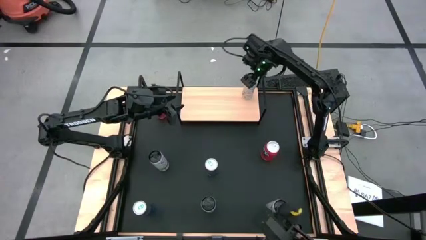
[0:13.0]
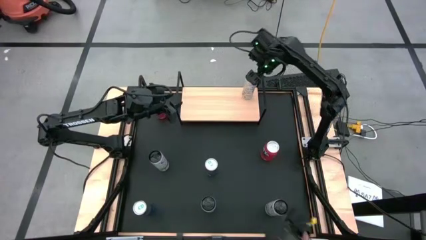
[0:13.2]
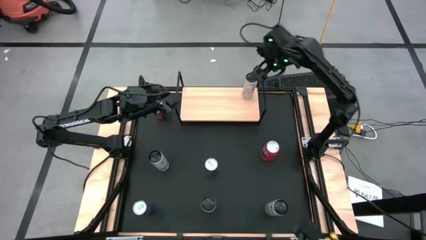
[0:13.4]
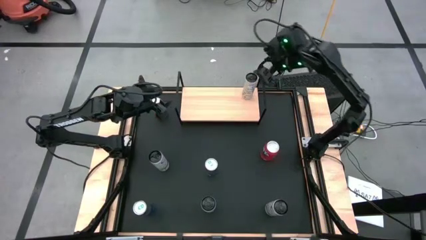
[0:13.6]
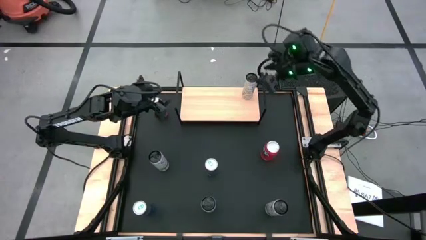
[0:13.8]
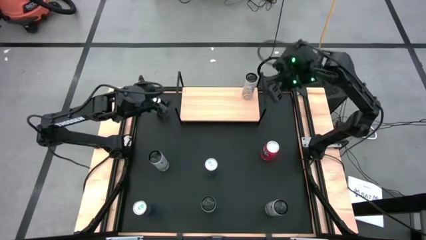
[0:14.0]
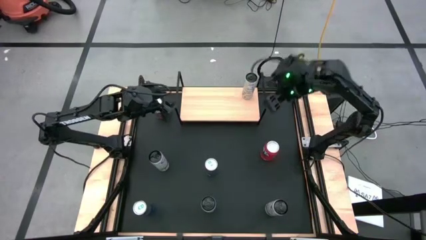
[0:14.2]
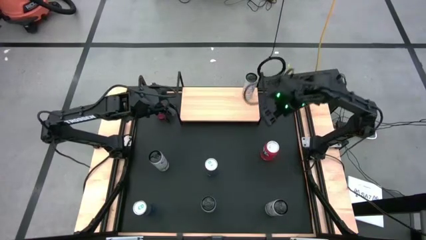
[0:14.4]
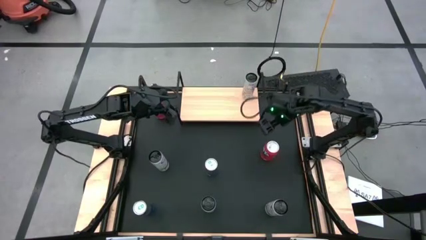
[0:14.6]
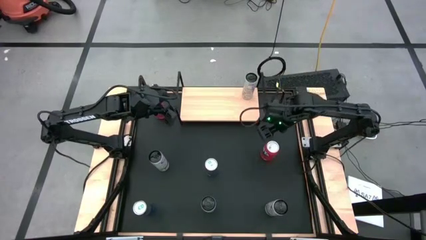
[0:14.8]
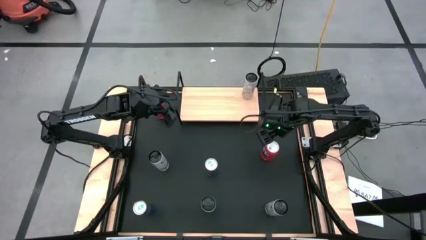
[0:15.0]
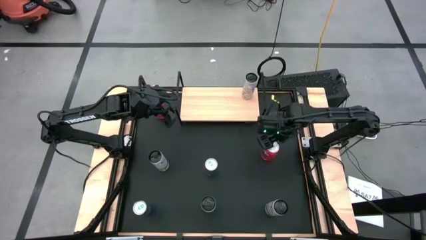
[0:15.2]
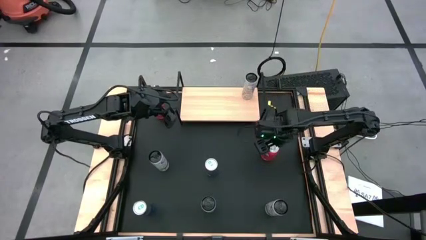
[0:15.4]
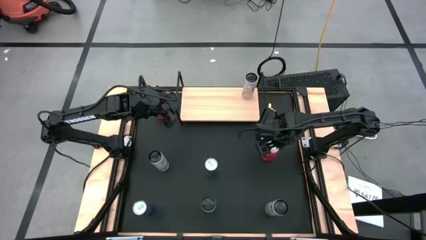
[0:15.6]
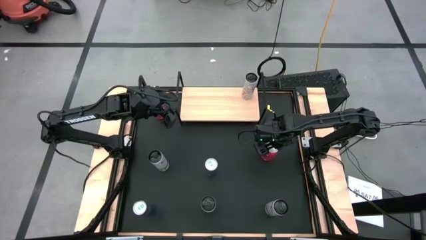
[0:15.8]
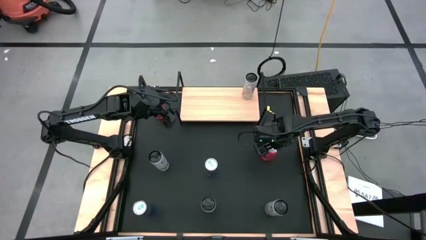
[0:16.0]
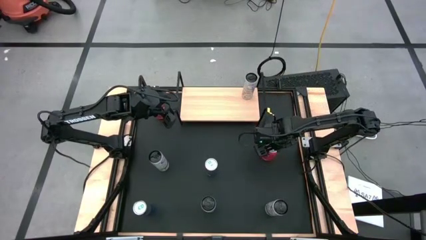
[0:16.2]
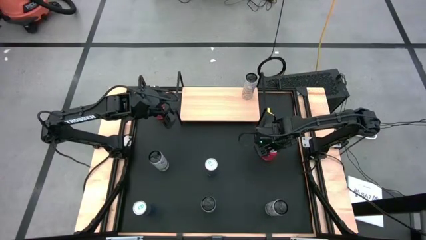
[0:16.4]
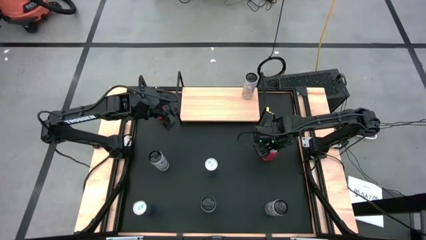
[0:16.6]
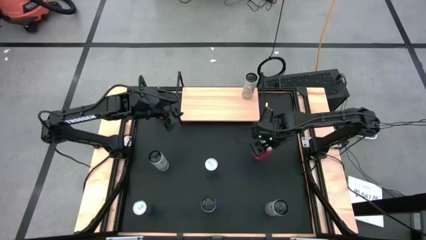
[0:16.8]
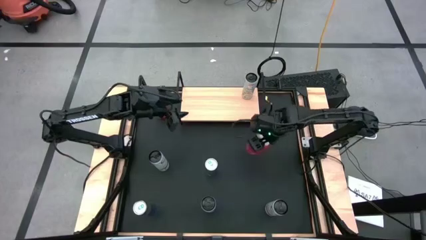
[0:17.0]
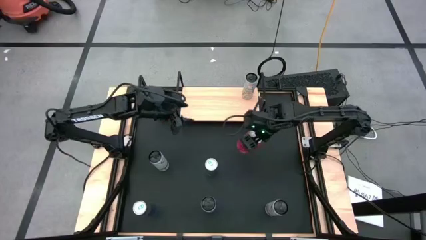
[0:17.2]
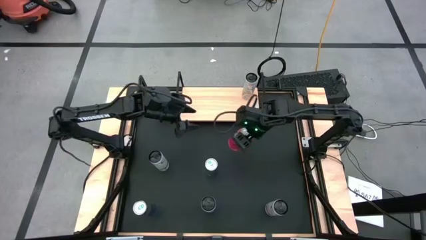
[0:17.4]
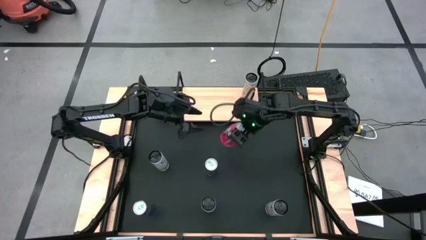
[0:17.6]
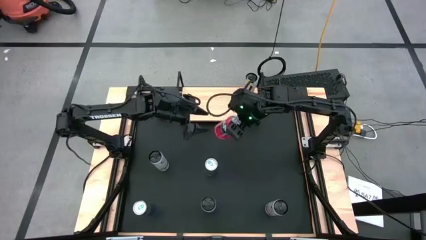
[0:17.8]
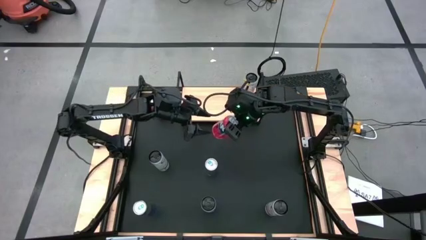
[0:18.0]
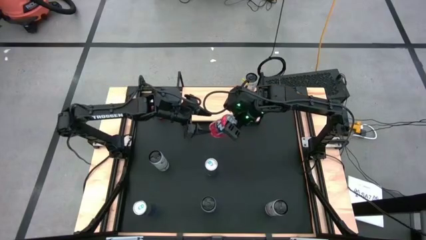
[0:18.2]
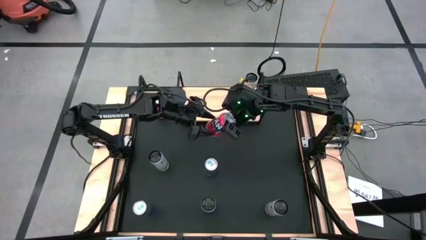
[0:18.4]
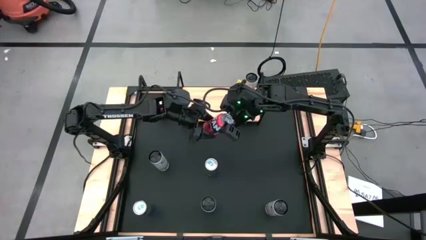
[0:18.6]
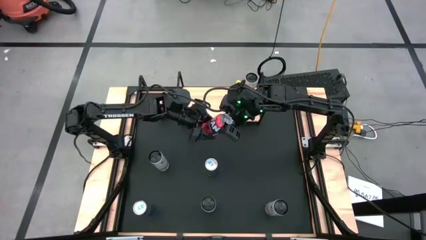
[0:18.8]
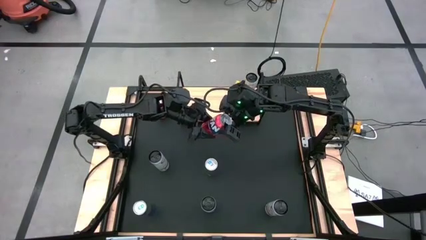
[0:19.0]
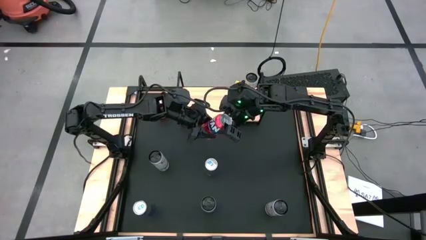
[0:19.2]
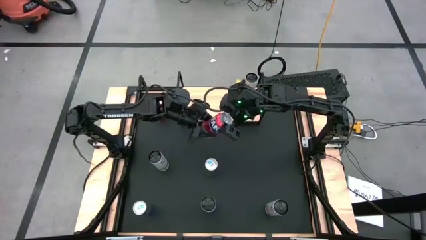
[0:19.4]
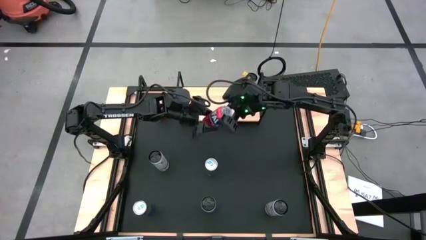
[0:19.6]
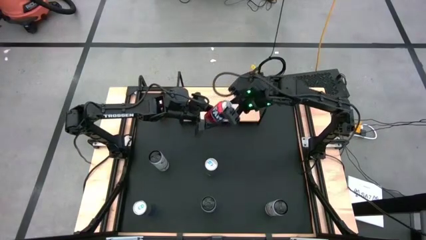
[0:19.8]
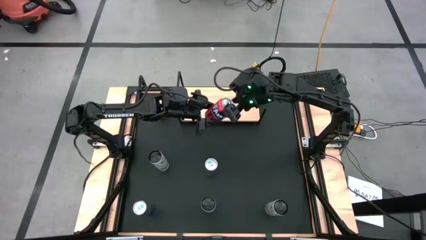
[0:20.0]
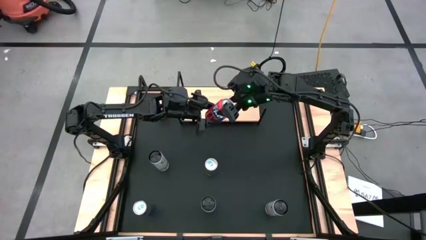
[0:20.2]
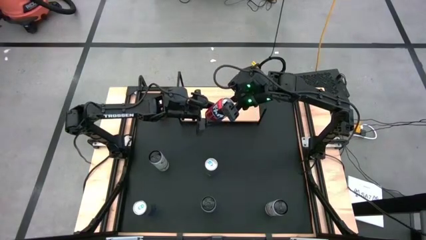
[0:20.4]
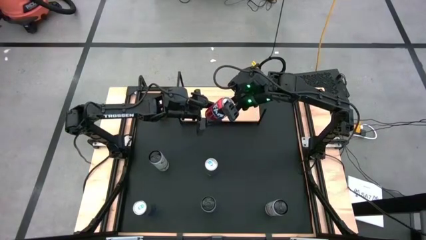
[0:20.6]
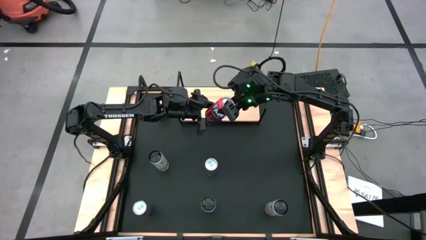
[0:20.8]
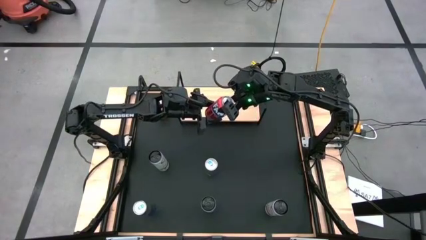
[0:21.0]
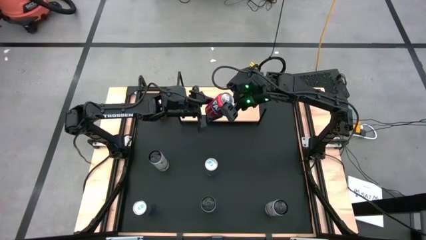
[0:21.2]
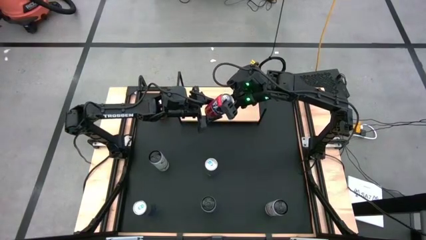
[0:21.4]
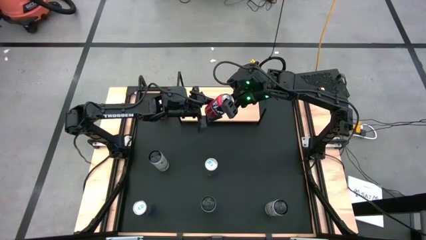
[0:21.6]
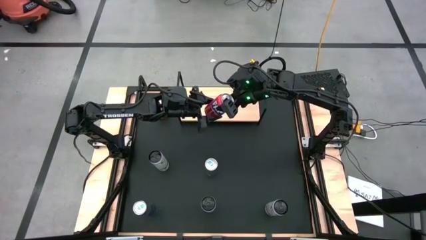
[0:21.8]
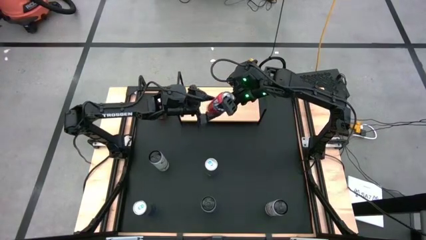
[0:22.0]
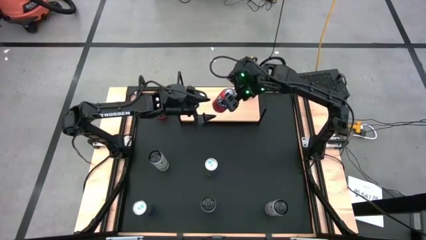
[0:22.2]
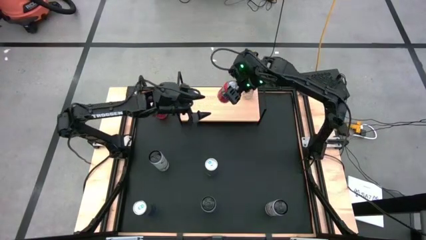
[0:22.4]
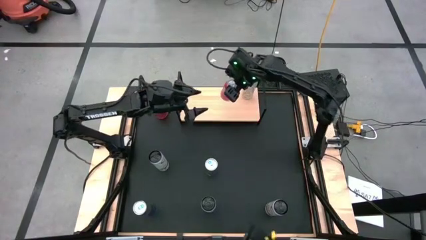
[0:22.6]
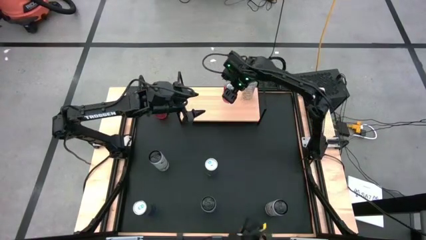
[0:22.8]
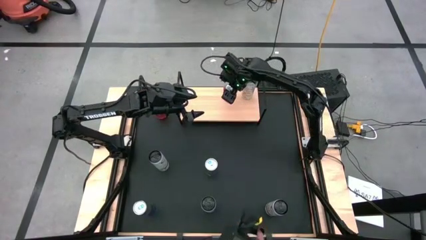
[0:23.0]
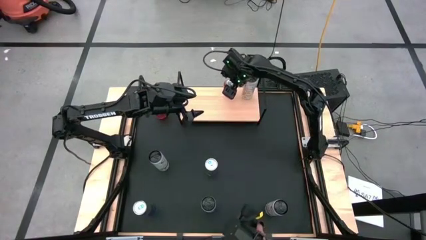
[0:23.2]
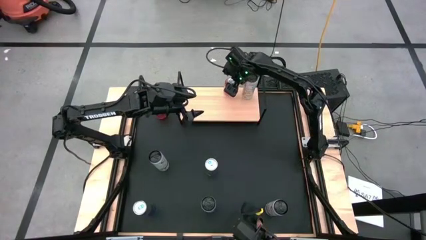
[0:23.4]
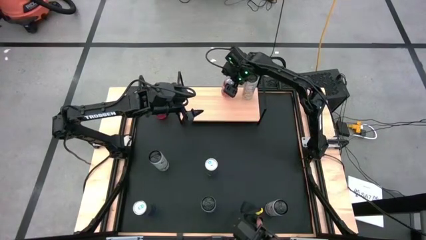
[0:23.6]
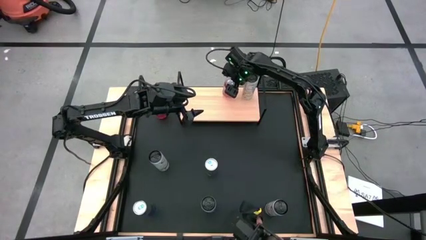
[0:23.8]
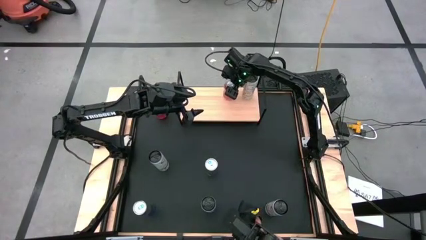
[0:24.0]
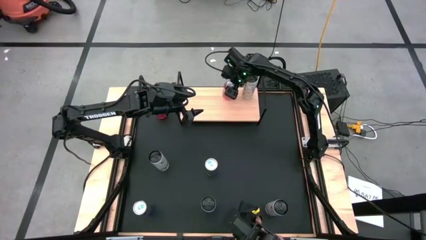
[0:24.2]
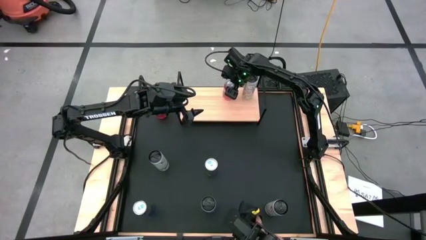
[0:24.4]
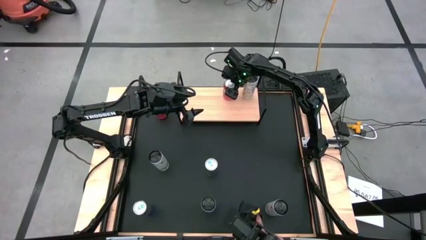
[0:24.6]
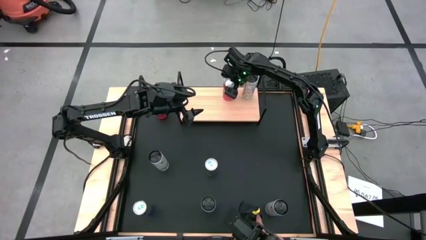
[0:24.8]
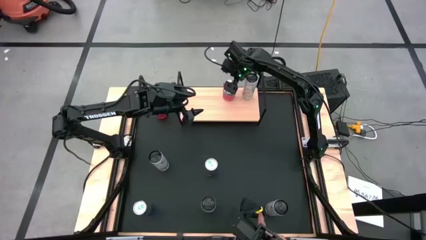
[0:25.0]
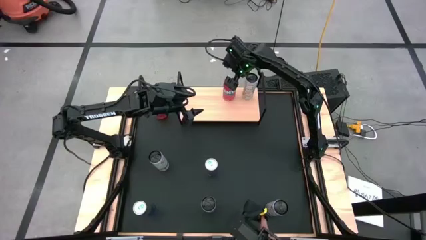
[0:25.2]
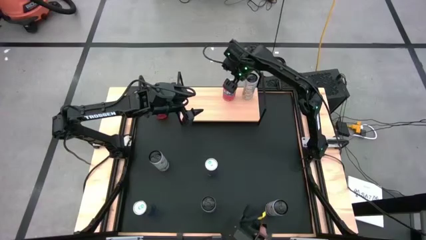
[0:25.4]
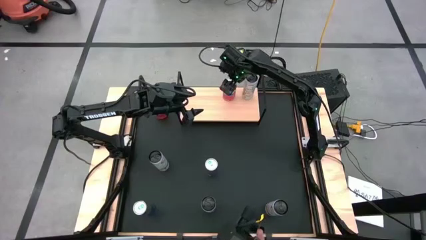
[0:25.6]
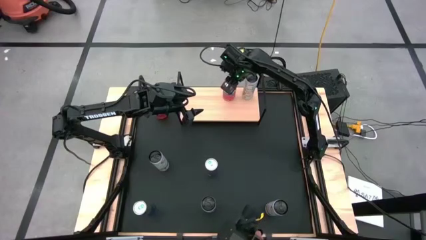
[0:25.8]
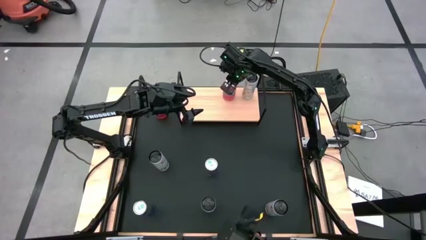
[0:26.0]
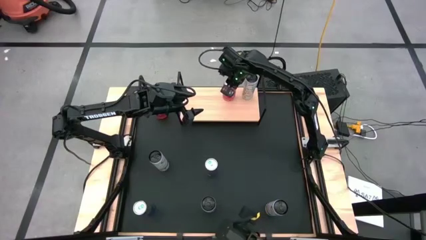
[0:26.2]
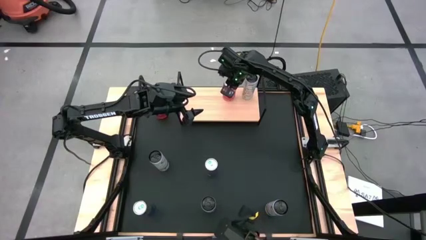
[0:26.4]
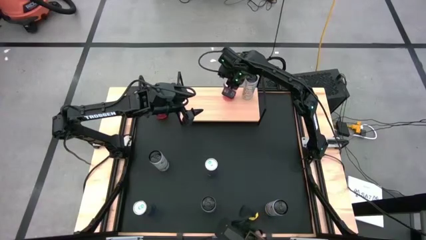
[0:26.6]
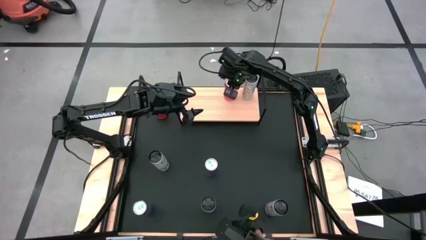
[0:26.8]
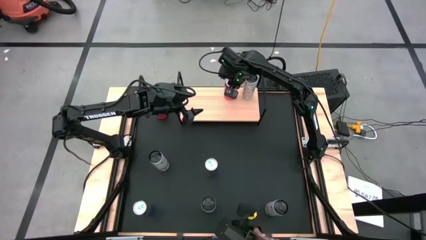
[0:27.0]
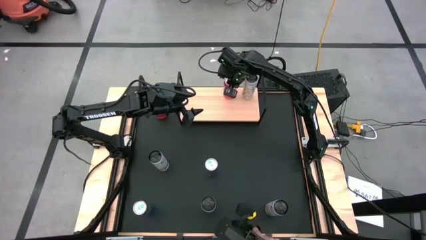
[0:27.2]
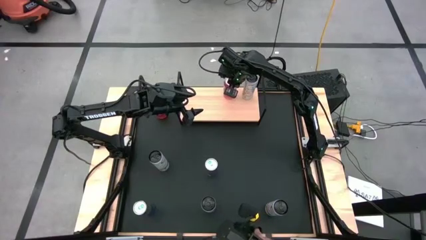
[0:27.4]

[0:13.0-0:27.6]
Task: Place canned beverage on shelf
Put the bottom red soda can on the shelf
